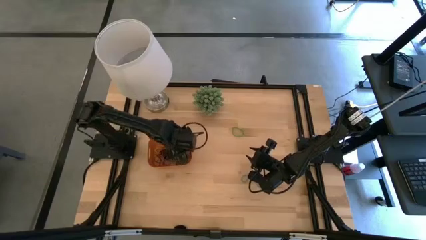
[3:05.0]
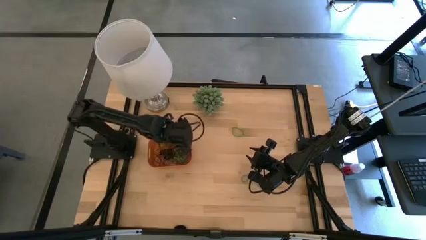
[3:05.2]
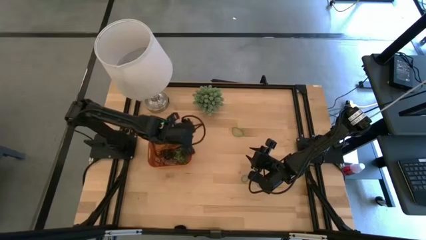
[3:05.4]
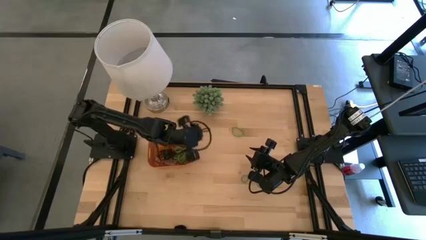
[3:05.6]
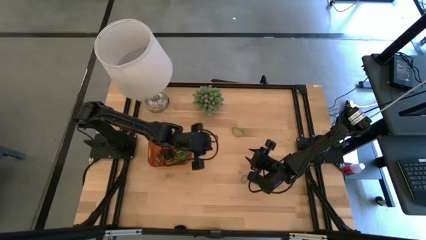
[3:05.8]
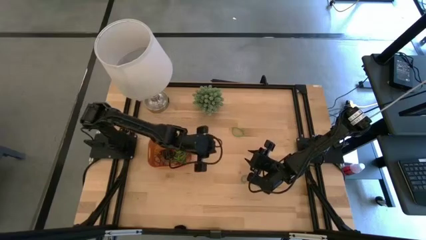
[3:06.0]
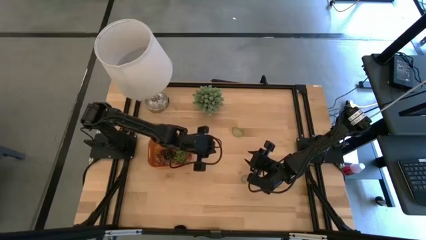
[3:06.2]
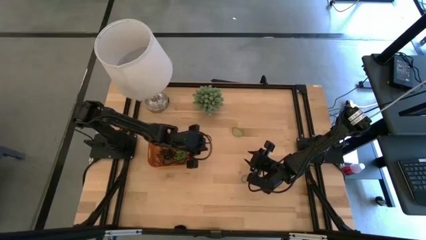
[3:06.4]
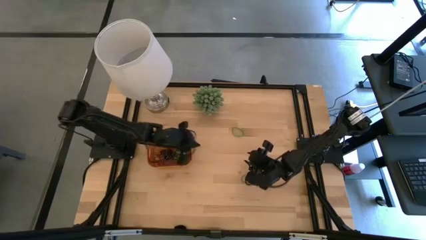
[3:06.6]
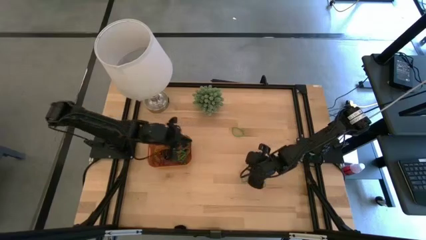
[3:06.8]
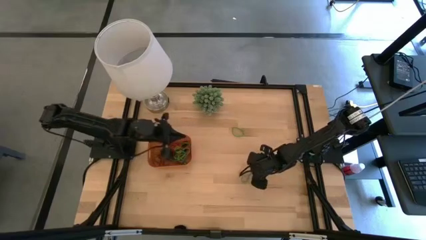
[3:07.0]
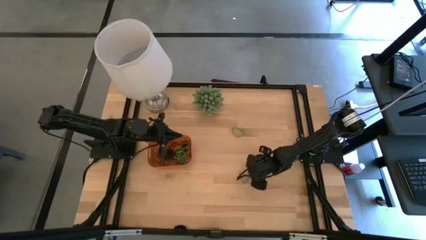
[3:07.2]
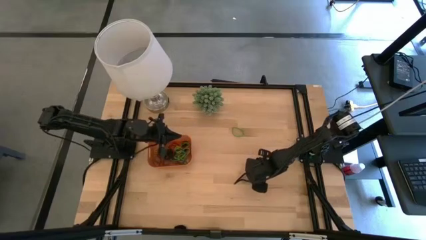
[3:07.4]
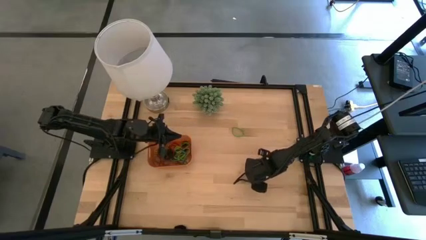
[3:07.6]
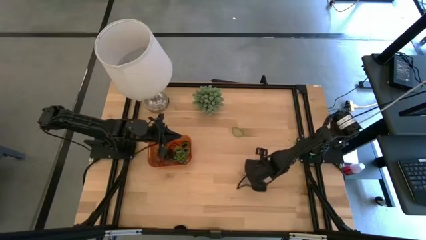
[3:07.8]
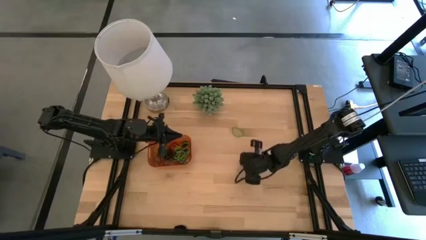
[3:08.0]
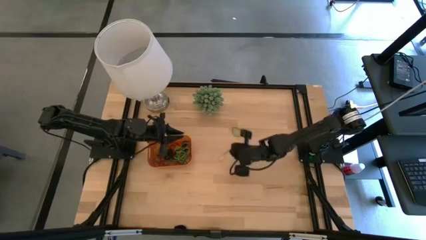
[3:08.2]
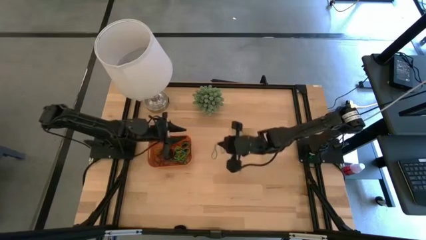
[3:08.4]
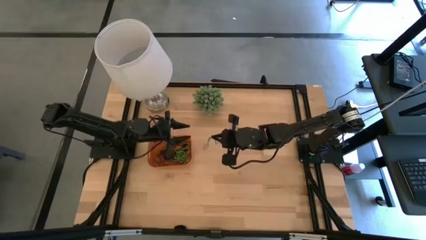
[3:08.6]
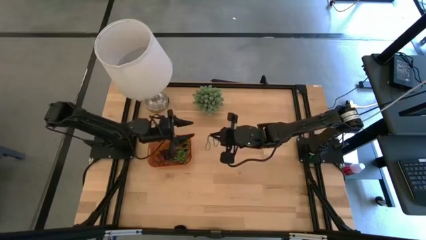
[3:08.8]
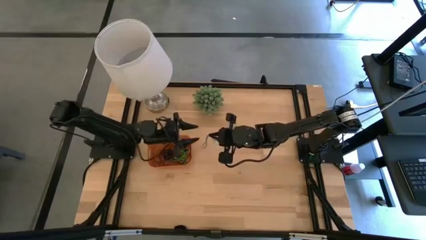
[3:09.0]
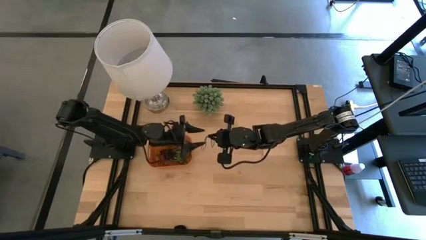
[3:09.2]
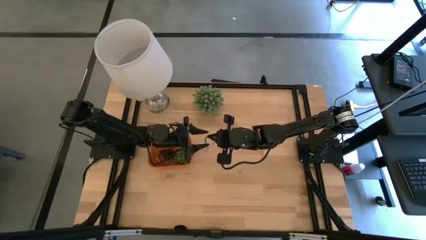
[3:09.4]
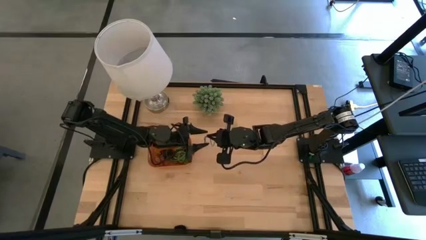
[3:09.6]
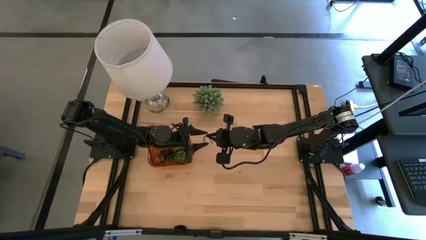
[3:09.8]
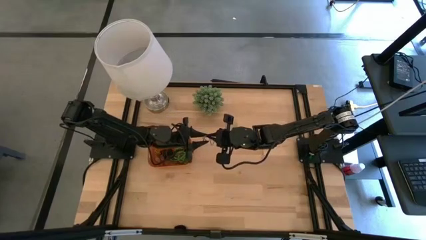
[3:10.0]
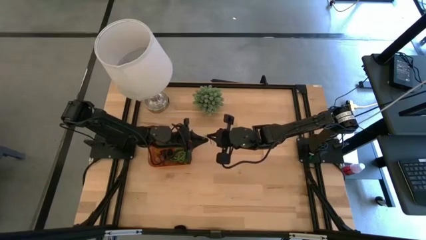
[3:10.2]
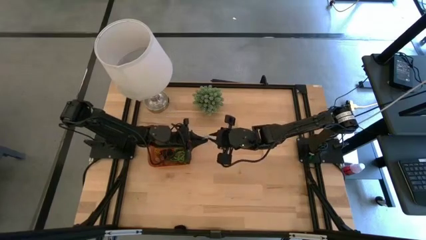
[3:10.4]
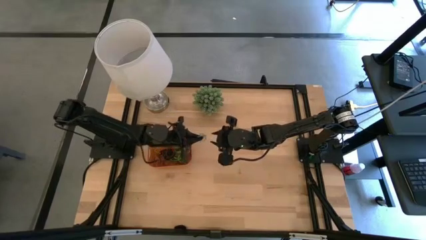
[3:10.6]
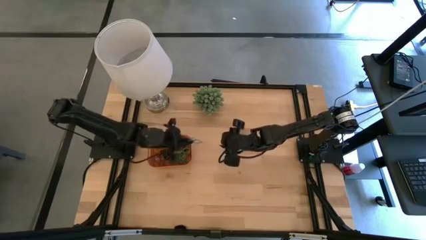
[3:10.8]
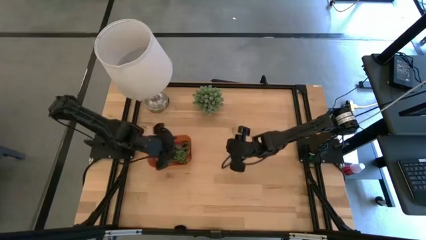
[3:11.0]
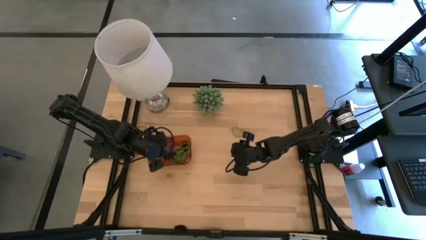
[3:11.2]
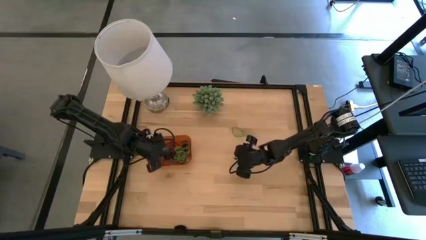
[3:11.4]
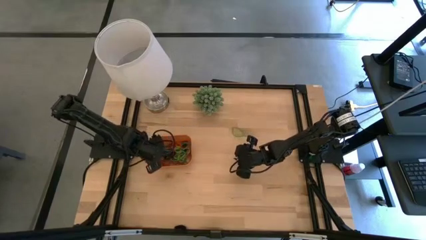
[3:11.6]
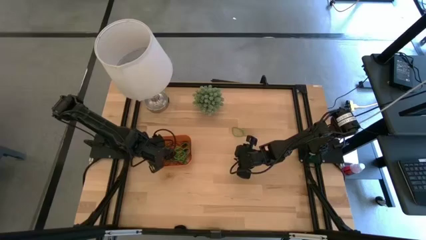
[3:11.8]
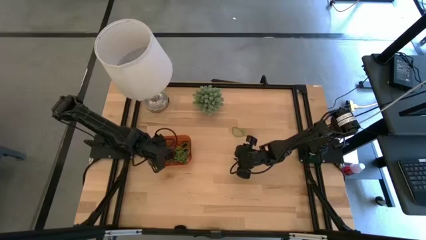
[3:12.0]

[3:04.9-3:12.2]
Task: Pick and place rubber bands into bin
Put the blue rubber band into the orange bin

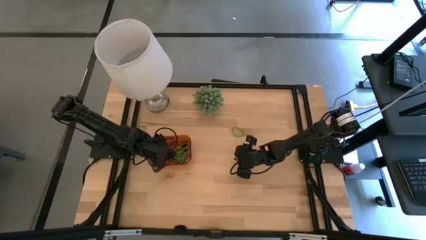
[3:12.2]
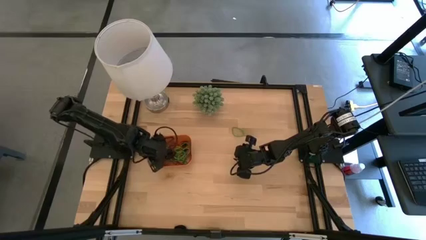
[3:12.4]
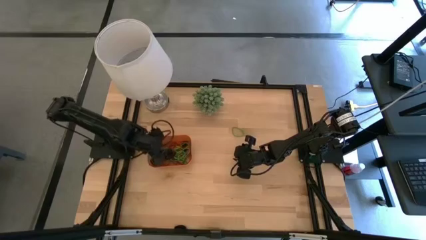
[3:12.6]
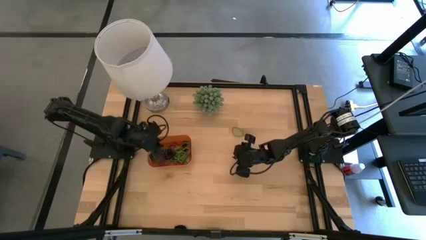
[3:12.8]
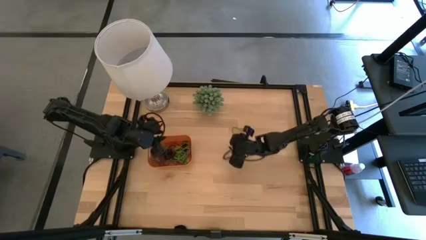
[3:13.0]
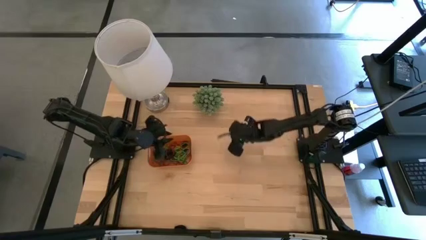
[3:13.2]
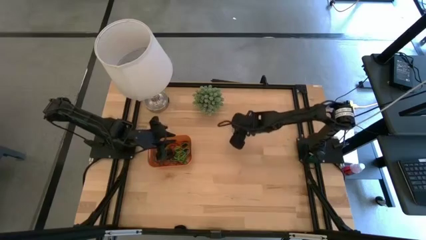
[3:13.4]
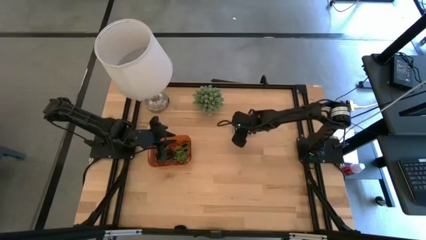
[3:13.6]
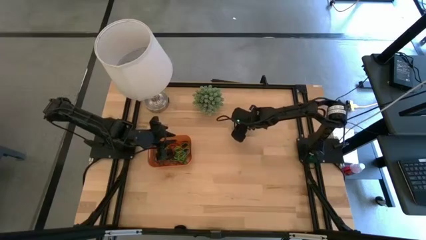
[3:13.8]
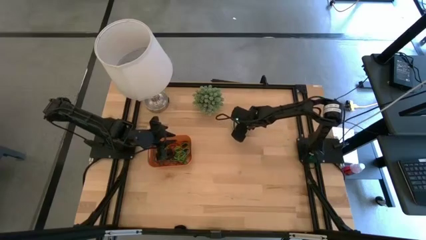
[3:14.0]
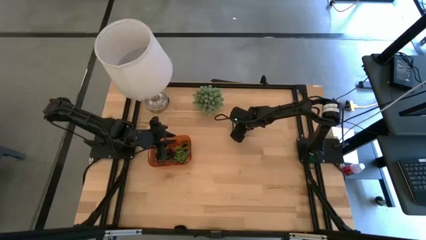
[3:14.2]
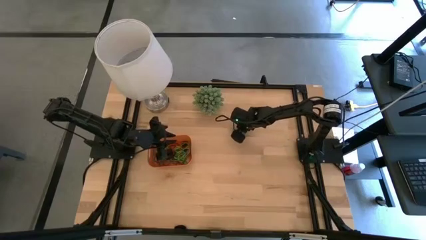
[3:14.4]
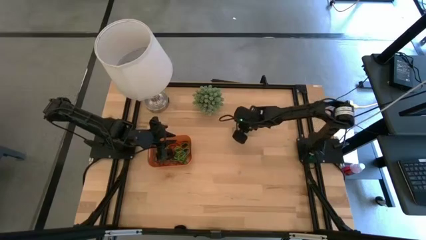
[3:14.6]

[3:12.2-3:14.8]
Put the green rubber band into the orange bin

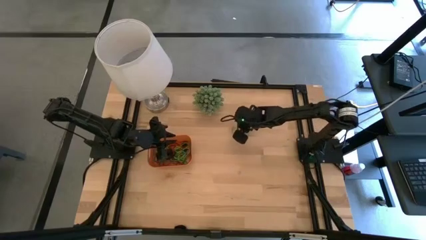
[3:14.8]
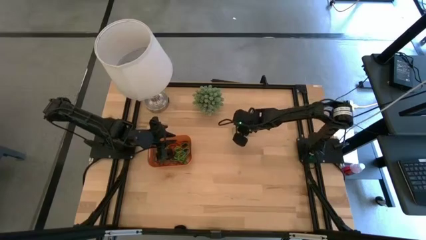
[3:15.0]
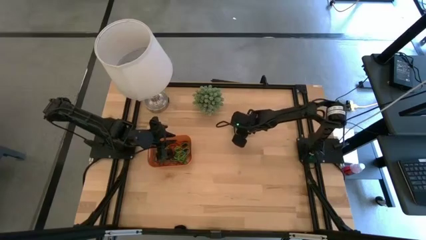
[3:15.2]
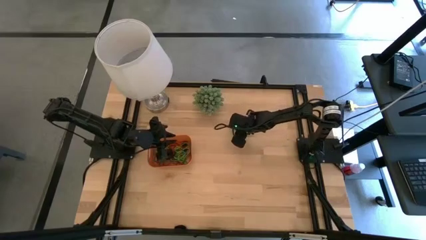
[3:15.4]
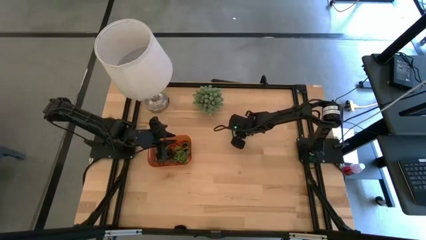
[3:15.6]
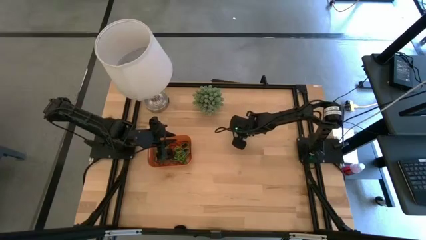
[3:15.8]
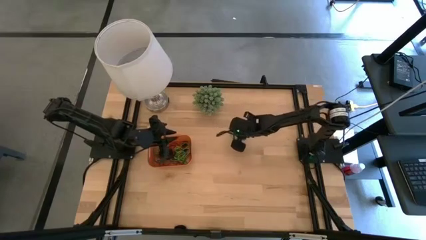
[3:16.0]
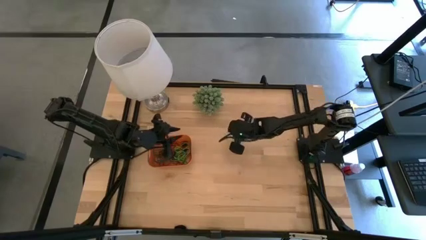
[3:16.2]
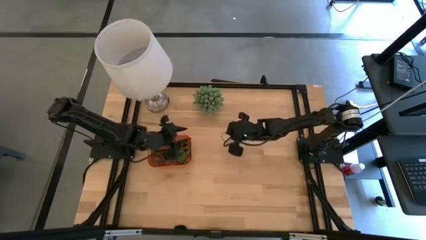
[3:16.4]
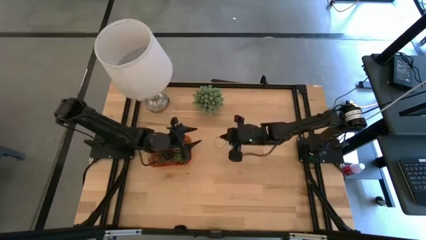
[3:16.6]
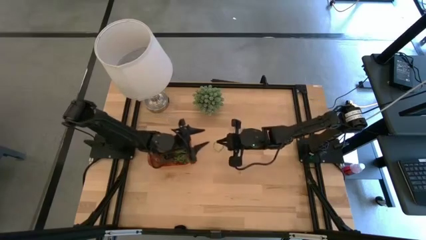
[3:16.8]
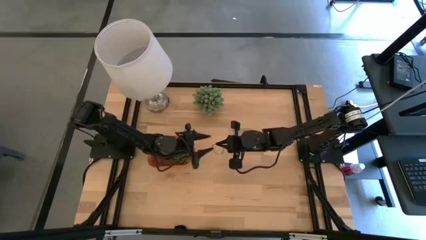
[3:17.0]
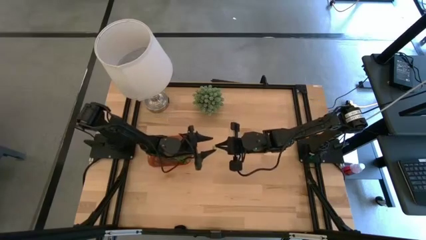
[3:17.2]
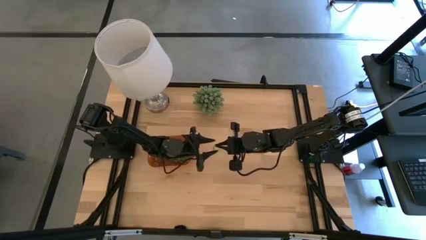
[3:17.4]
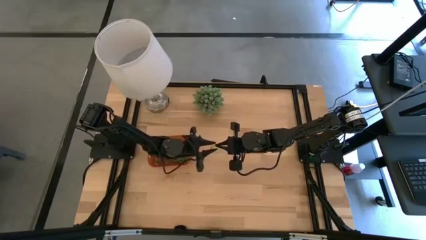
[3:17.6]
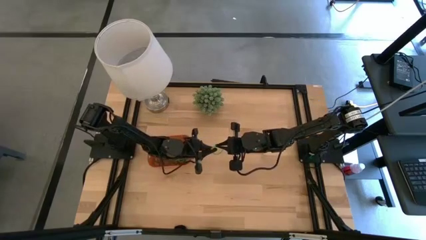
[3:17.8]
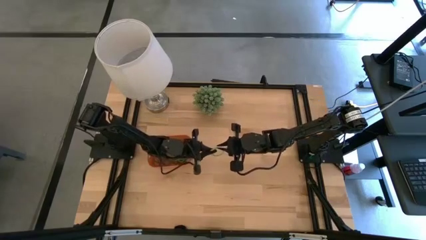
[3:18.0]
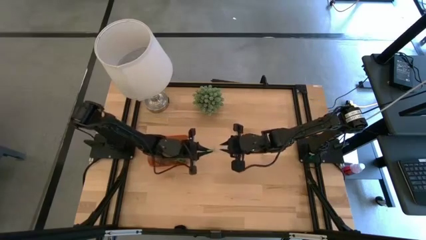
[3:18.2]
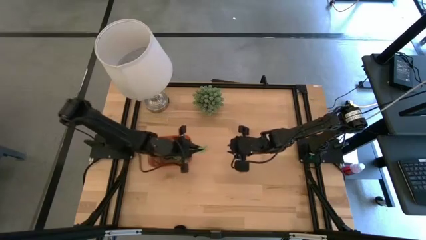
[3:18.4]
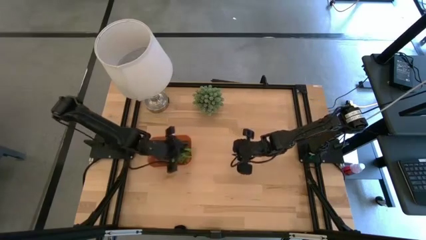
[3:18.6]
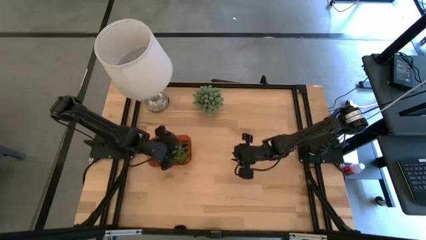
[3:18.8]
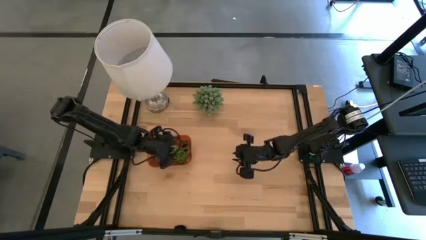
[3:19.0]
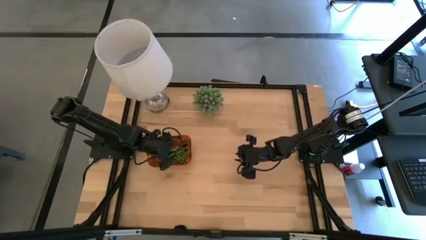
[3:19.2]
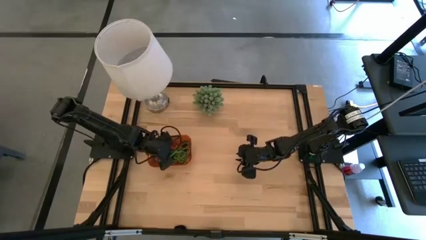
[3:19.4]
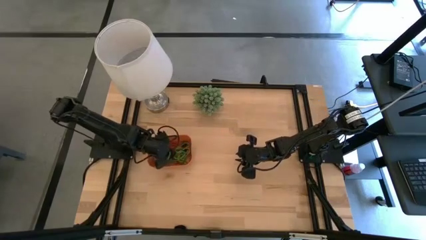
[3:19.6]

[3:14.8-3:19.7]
Put the green rubber band into the orange bin

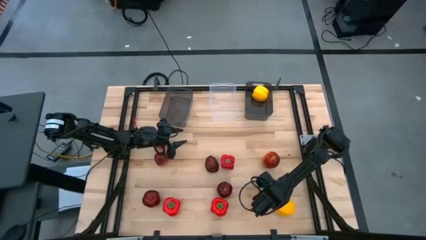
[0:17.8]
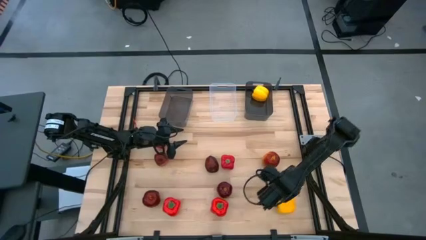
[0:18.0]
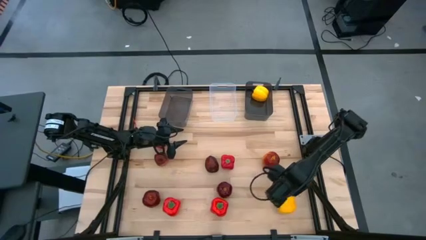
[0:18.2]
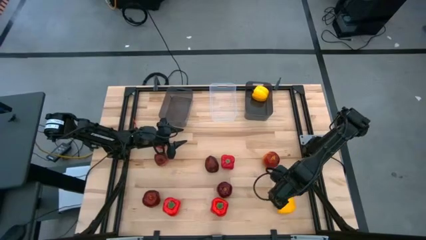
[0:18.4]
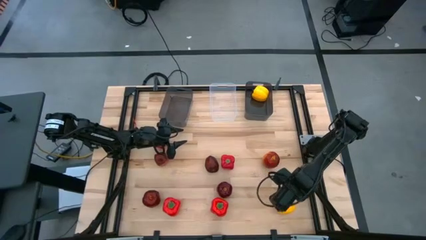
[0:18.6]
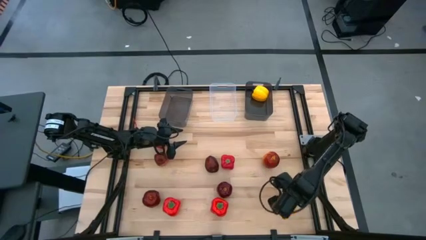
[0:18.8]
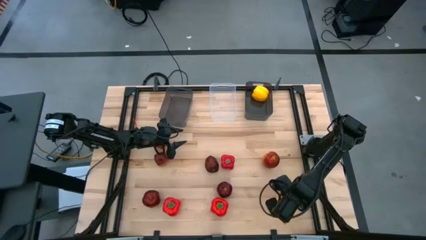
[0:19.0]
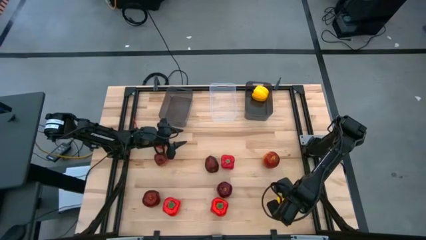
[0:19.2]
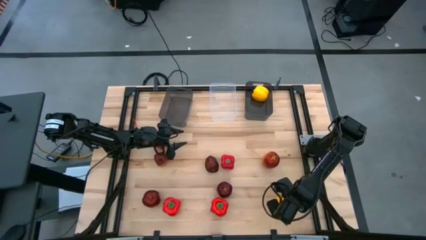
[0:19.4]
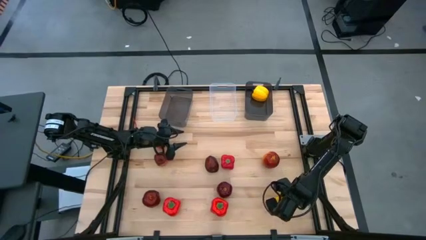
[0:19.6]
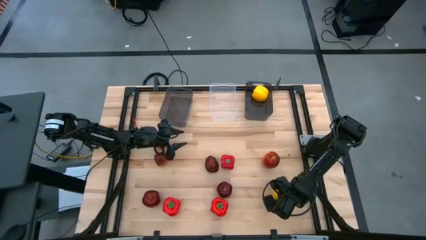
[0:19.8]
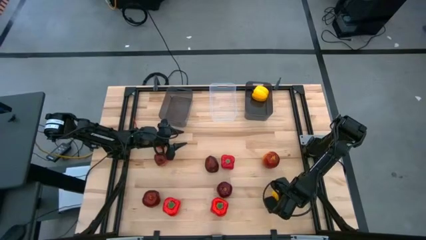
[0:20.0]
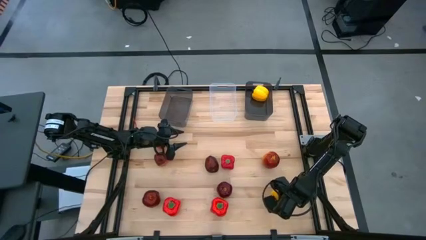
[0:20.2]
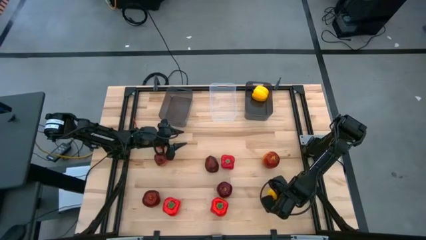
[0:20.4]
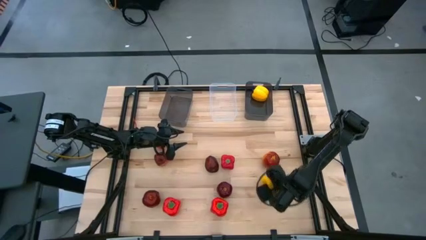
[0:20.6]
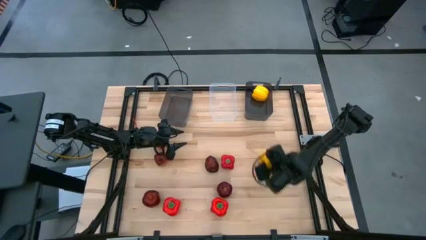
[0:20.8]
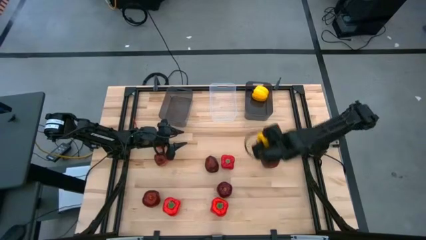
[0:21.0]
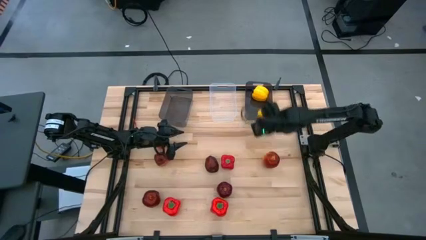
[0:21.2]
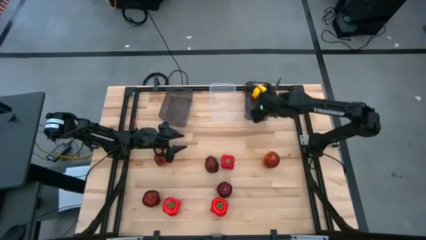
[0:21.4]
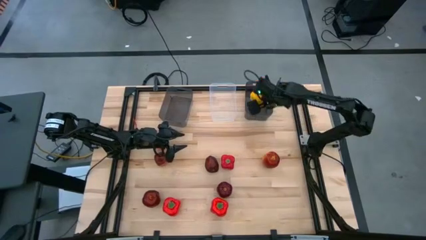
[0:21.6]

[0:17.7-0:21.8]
Task: Sort produce into baskets
Put the yellow bell pepper into the right black bin
